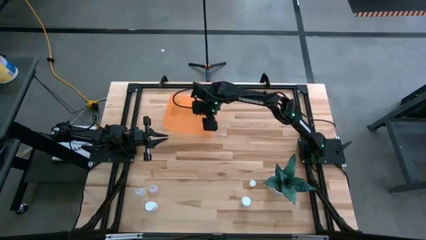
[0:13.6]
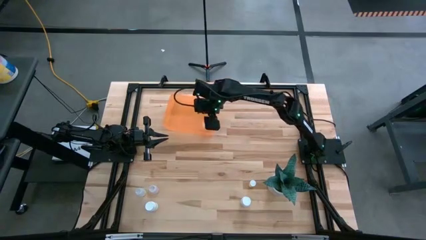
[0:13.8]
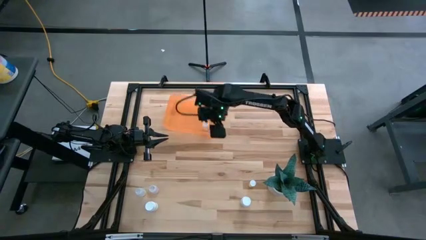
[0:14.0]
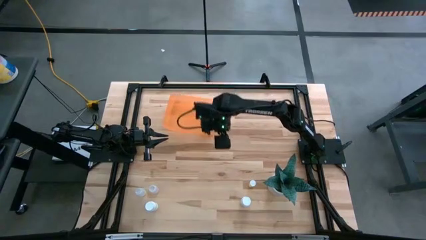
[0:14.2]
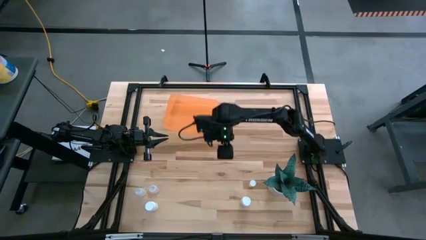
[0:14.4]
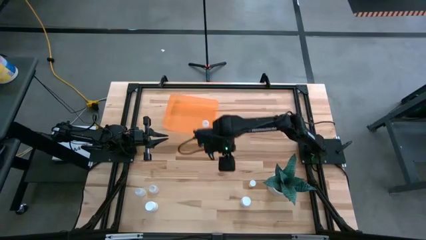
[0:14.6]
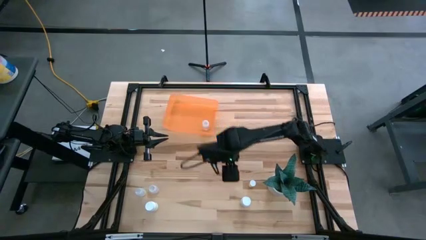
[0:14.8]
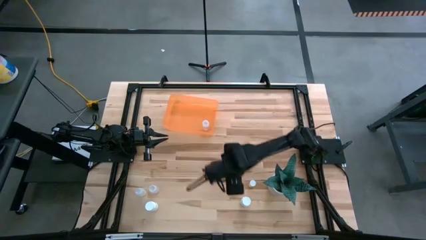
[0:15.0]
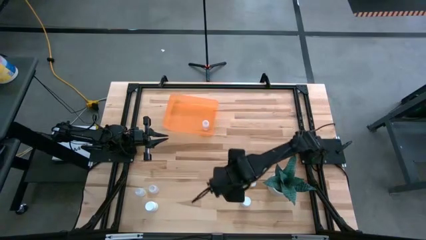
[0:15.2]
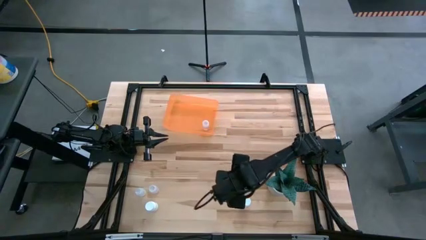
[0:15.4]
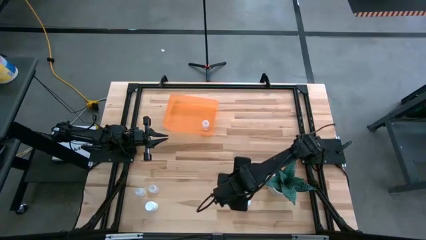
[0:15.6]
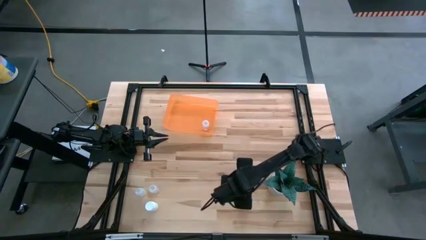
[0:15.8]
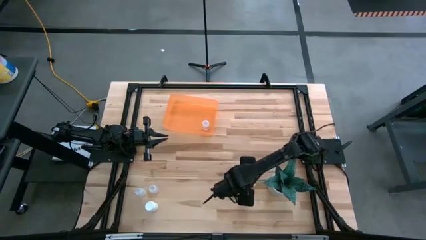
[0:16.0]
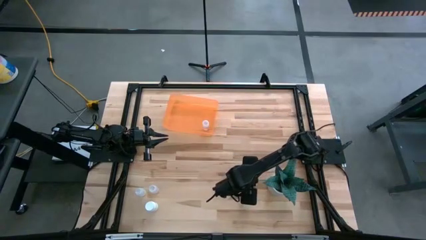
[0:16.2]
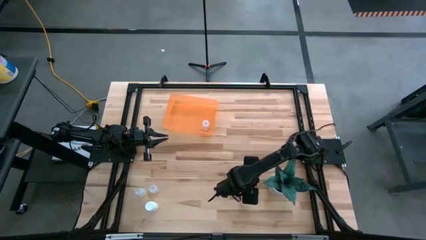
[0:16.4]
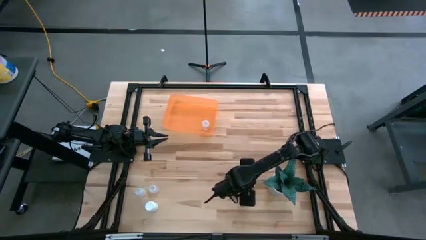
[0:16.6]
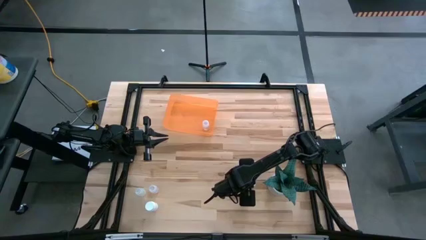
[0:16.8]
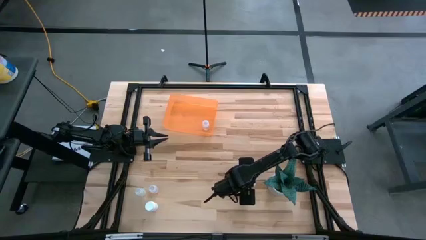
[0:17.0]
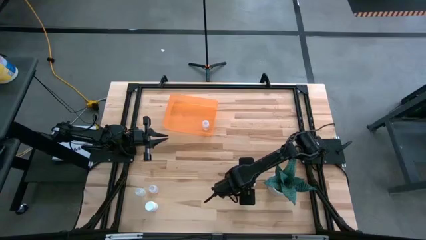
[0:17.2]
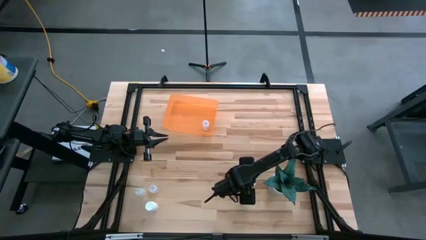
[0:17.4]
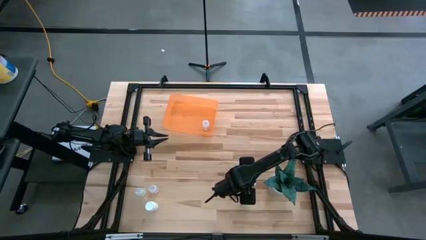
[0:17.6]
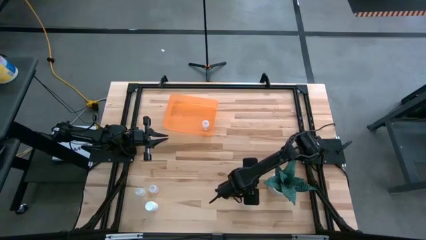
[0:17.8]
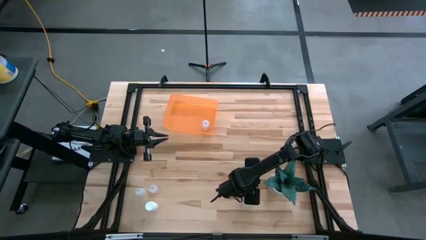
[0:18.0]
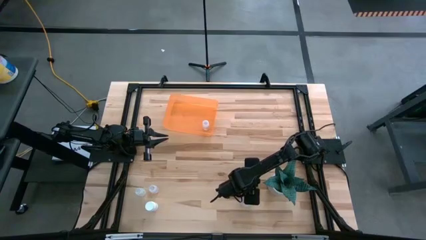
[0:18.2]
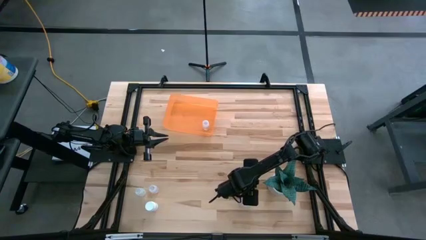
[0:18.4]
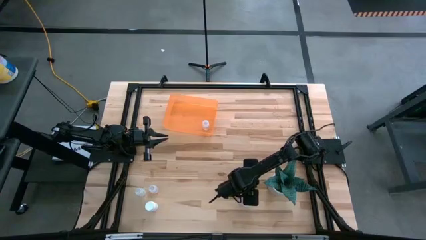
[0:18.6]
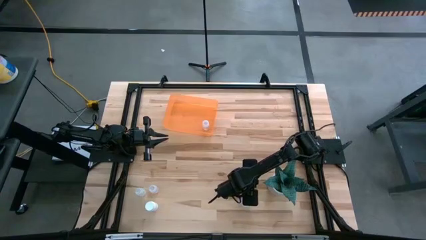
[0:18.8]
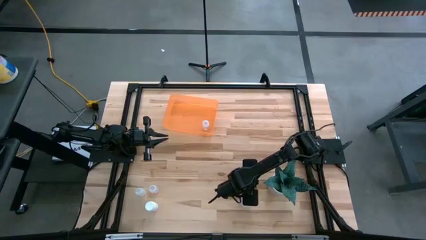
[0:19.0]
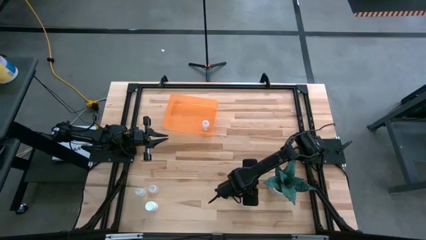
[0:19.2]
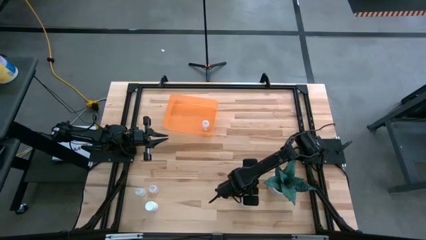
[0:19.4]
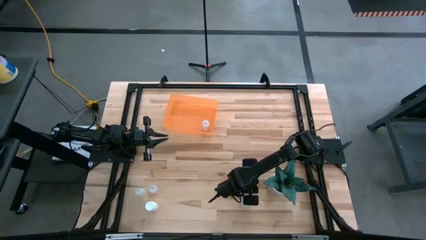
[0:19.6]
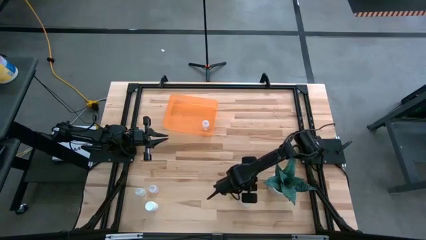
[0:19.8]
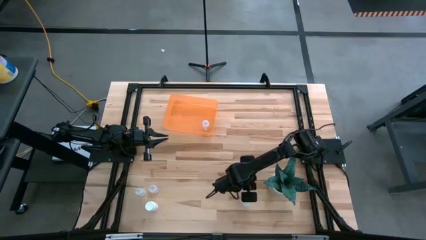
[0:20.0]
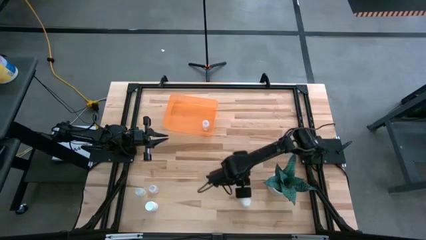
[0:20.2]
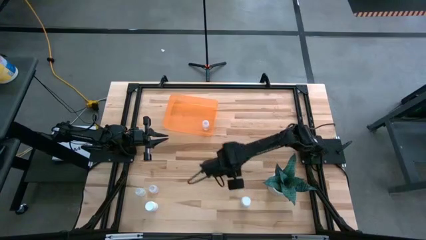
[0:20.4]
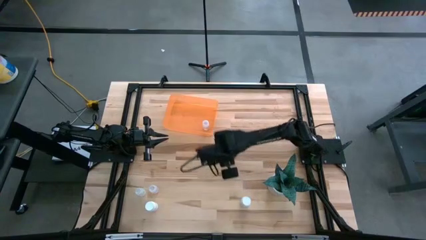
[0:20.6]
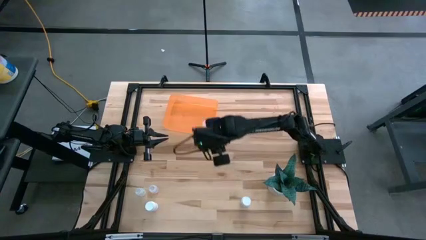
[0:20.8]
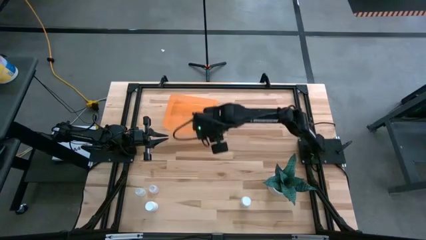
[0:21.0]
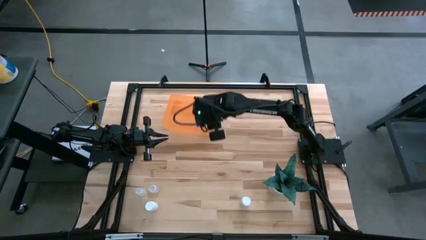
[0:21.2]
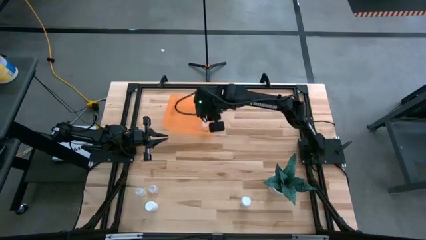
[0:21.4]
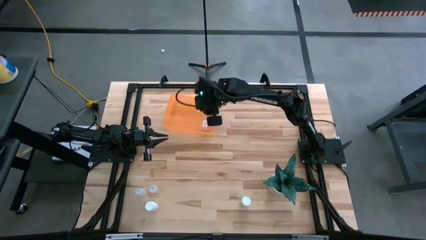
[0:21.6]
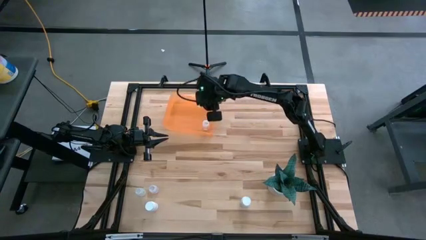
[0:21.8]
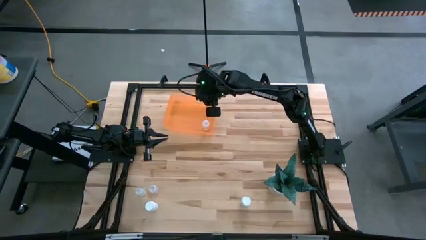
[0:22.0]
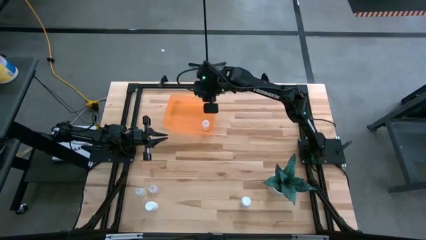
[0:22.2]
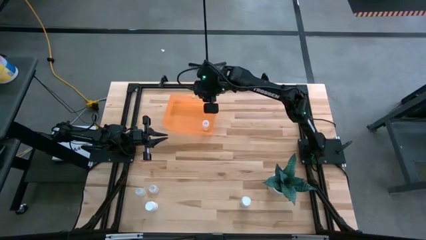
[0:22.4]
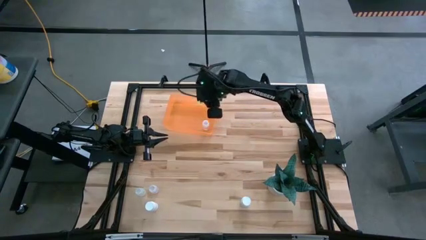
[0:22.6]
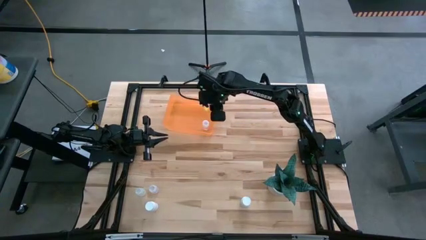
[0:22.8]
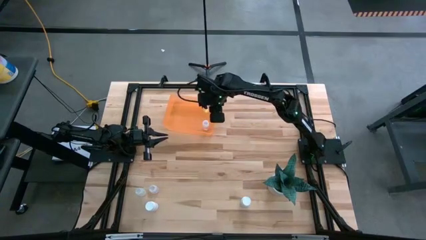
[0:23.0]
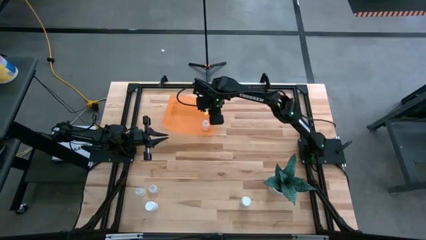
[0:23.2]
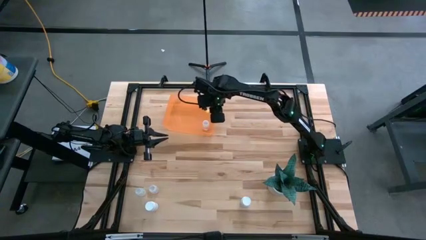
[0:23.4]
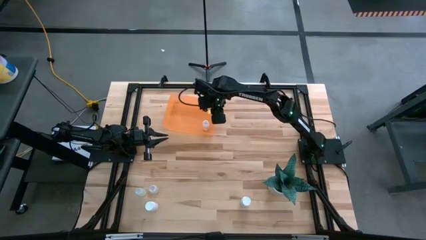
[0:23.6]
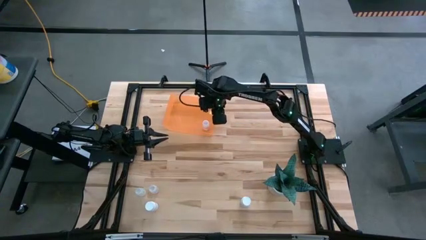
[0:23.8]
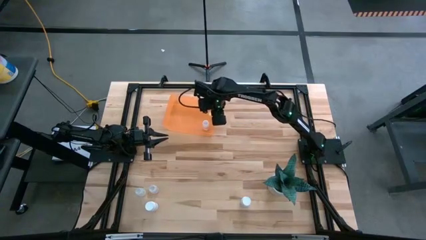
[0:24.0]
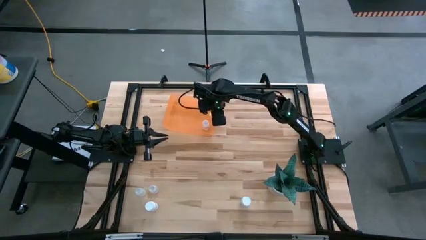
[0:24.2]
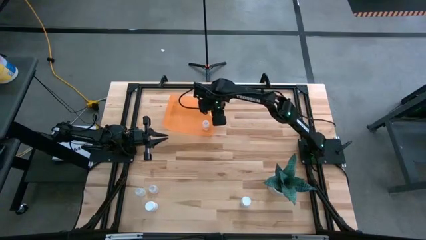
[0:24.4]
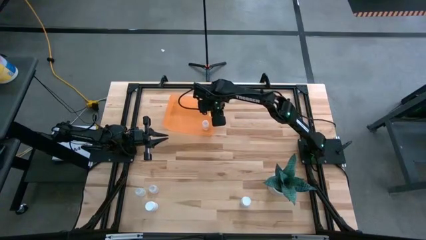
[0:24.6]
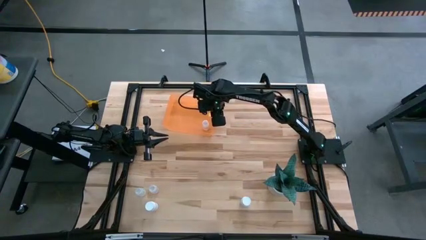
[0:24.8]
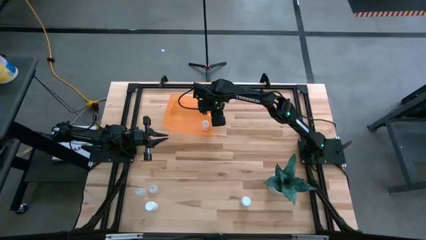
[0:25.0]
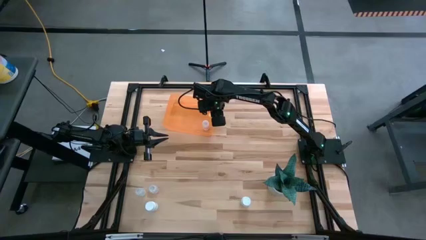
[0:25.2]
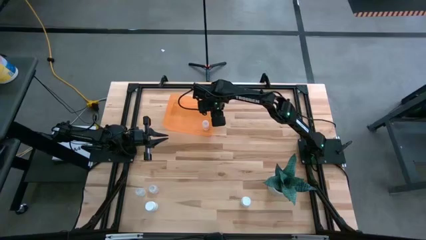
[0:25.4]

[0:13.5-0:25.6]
Task: Pick and place pill bottles into a basket
Put the yellow pill bottle into the orange bin

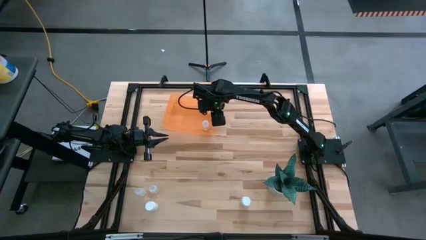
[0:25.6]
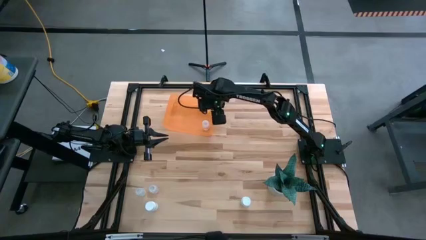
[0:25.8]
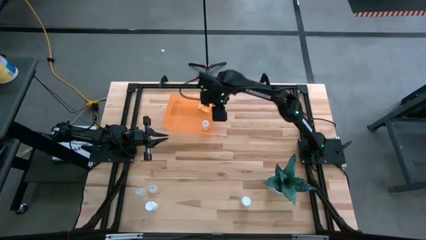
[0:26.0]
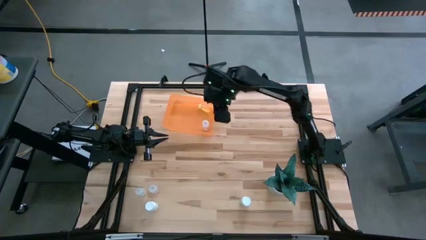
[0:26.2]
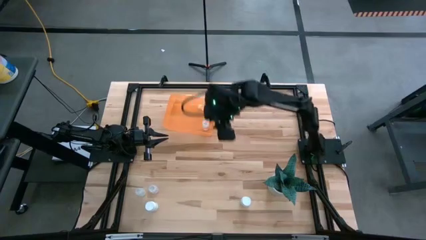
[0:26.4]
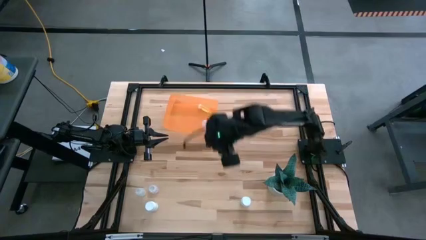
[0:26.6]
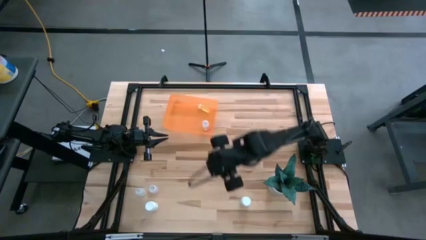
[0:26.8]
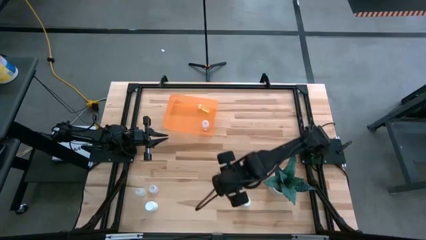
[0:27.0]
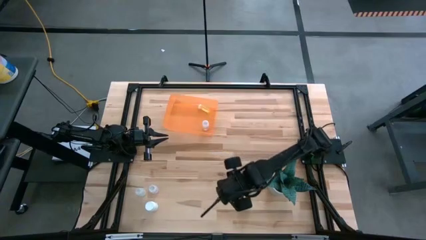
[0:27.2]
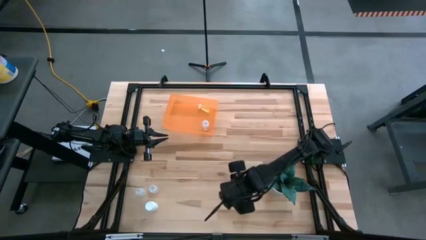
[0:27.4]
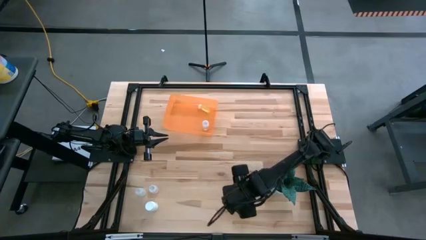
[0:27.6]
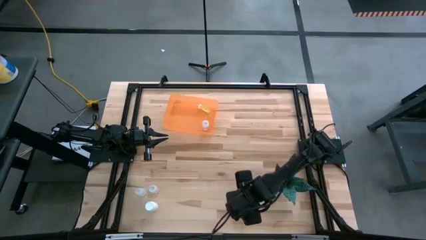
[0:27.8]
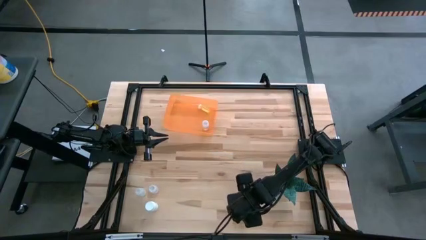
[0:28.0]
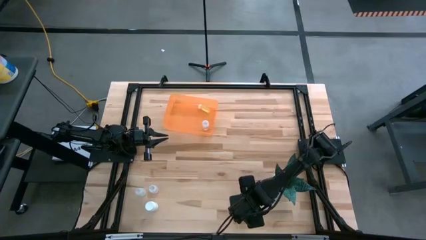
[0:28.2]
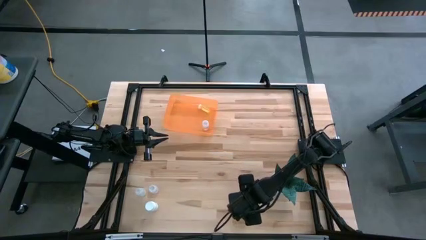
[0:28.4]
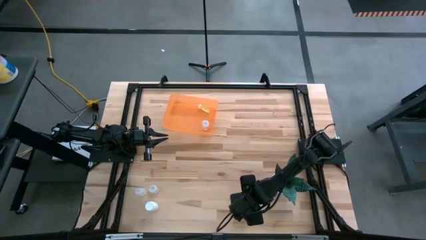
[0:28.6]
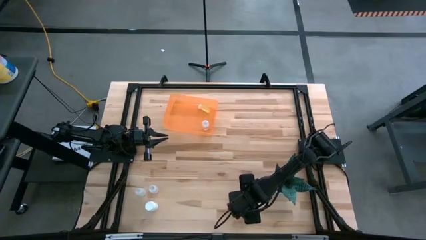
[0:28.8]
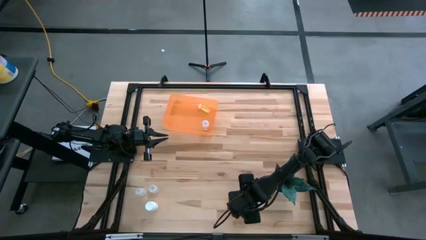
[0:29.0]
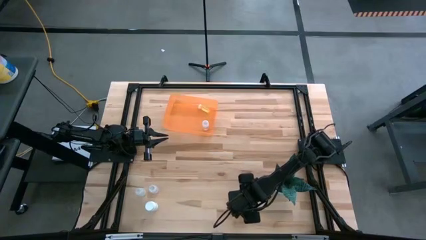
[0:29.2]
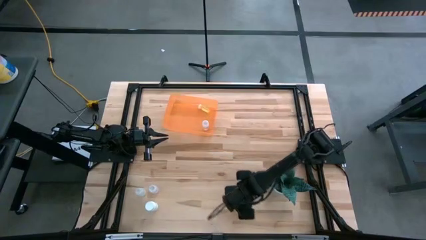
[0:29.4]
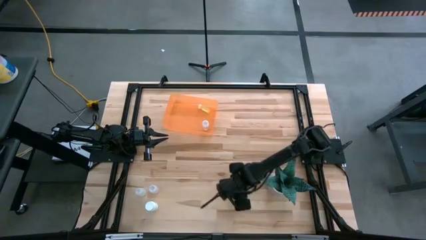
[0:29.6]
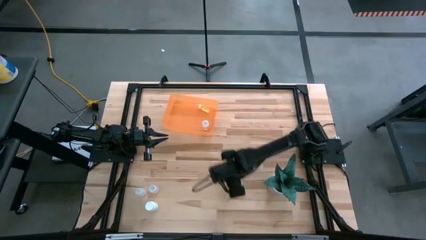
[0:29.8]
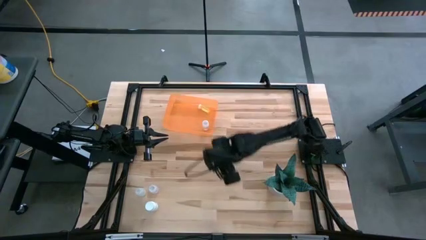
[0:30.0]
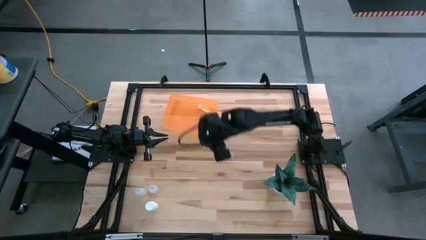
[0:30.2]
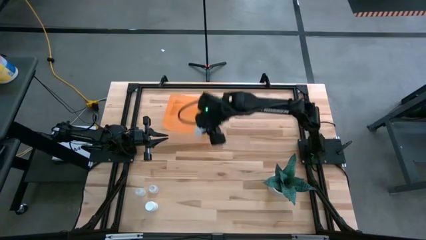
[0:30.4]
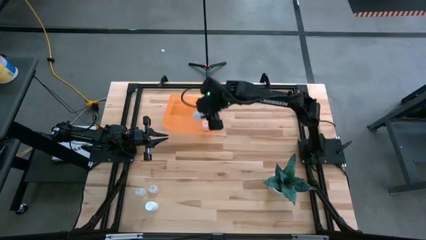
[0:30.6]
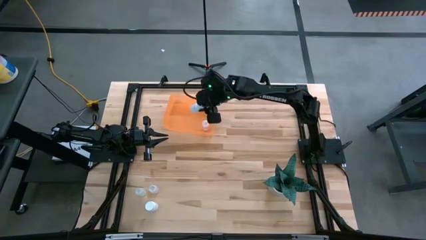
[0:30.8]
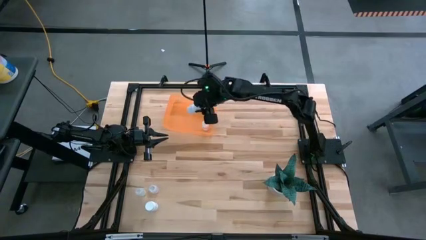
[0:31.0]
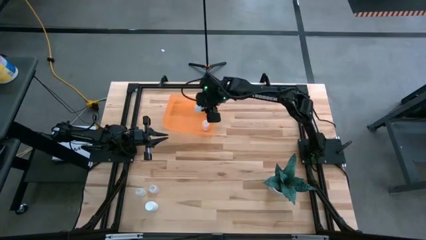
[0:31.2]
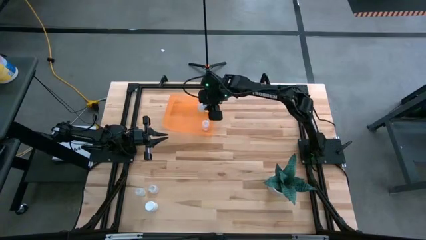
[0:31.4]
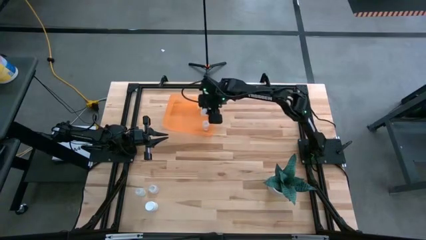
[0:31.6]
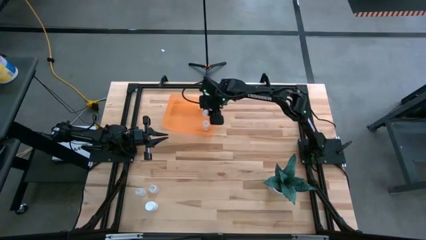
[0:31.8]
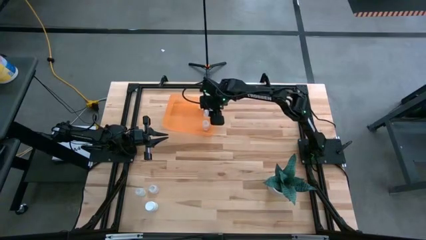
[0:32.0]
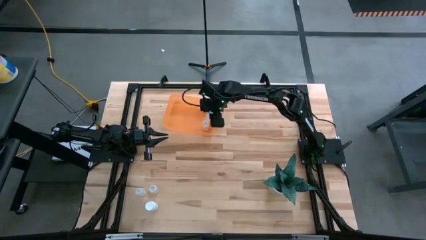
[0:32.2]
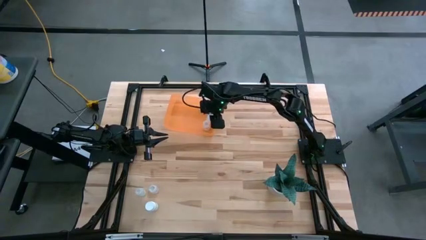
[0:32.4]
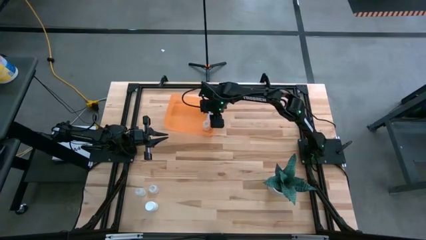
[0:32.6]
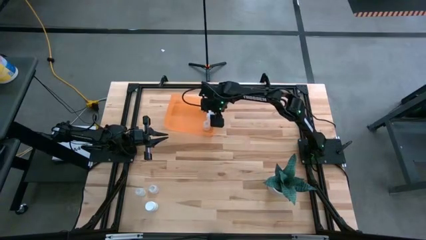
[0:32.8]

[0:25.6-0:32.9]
Put the right white pill bottle into the orange bin
